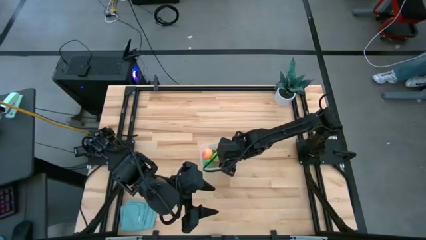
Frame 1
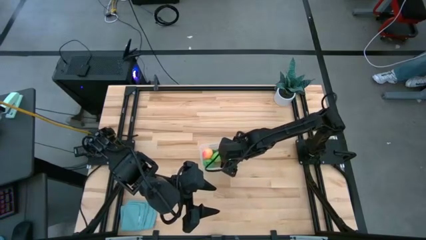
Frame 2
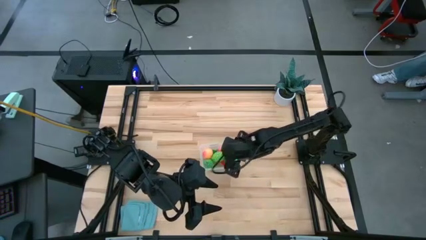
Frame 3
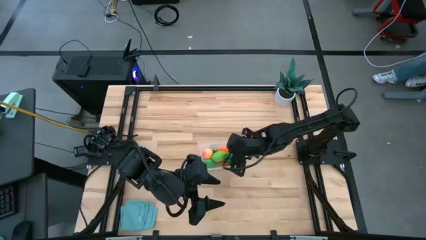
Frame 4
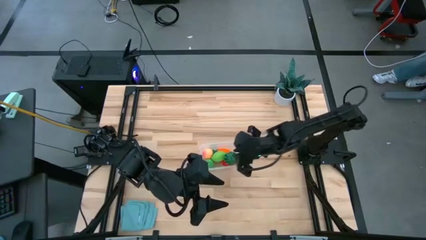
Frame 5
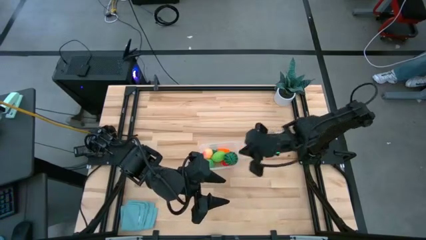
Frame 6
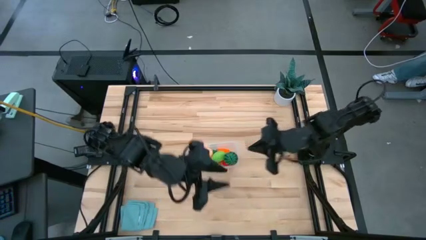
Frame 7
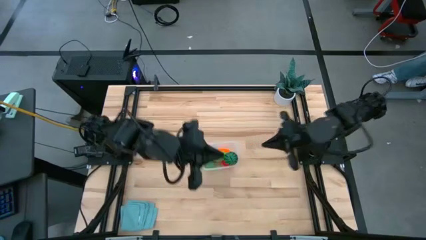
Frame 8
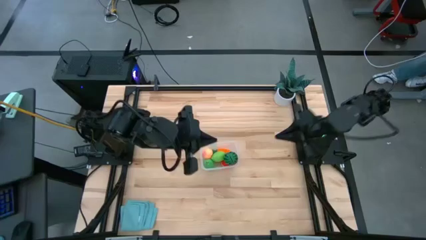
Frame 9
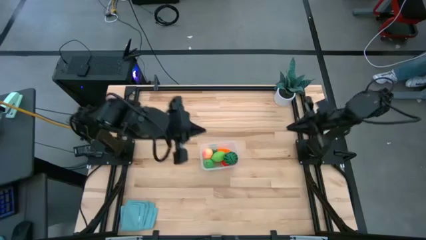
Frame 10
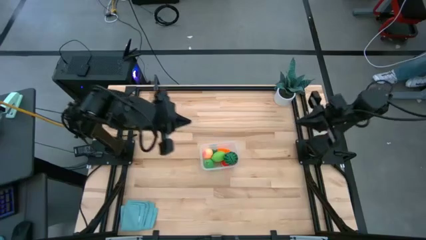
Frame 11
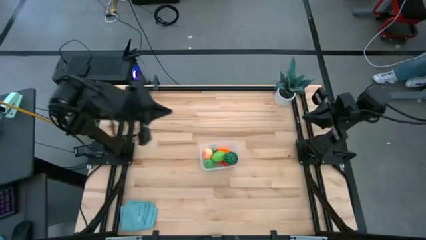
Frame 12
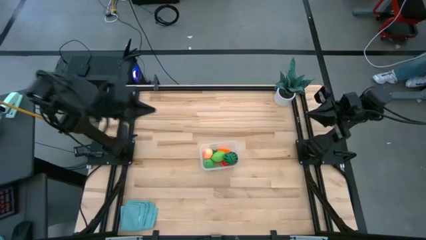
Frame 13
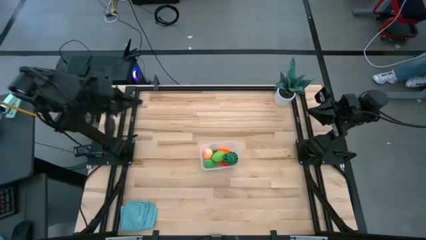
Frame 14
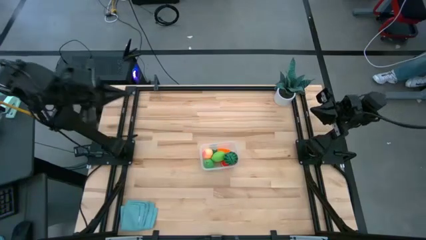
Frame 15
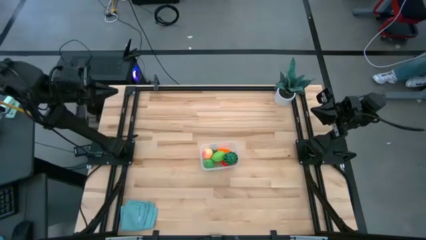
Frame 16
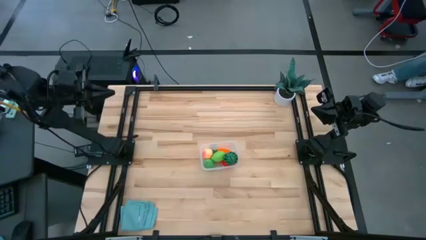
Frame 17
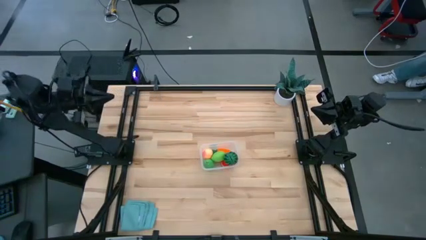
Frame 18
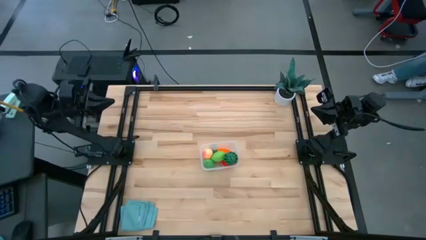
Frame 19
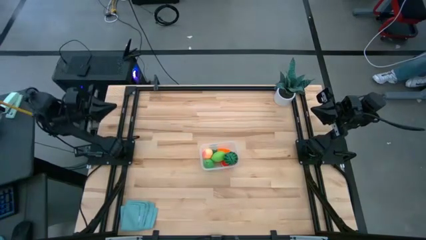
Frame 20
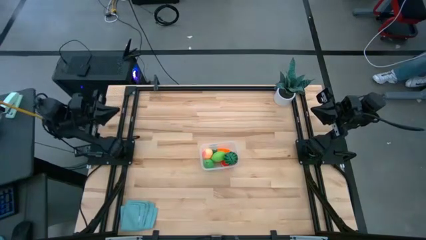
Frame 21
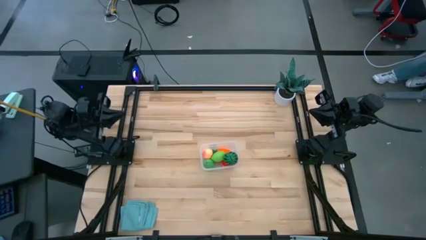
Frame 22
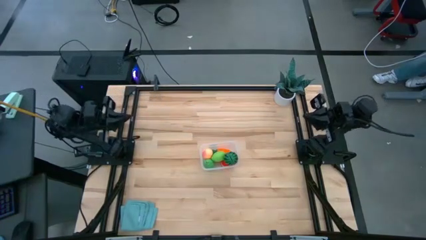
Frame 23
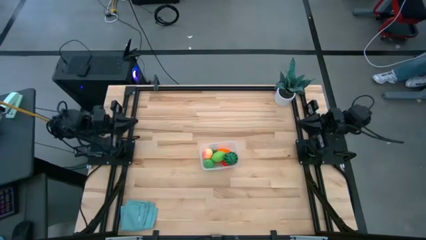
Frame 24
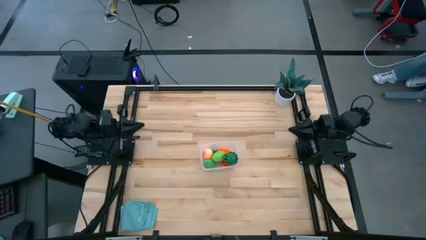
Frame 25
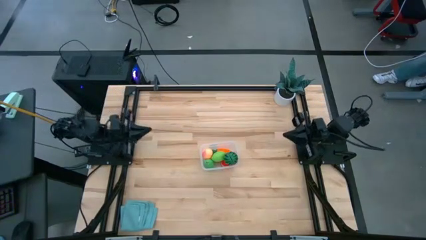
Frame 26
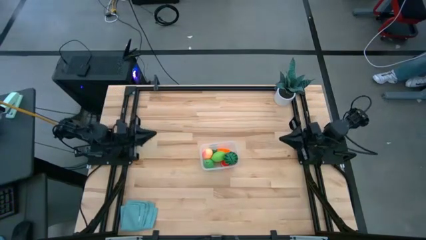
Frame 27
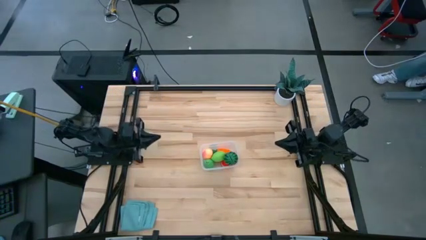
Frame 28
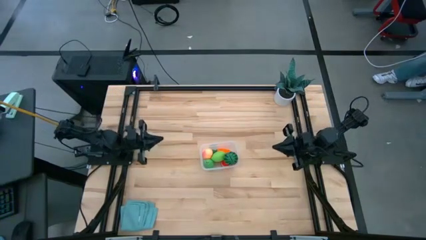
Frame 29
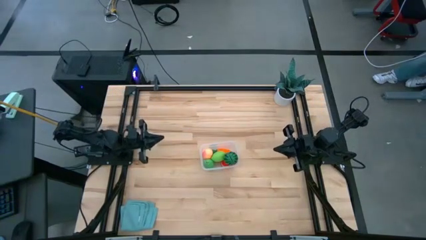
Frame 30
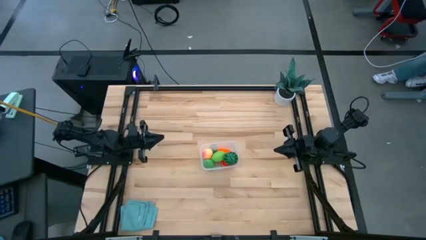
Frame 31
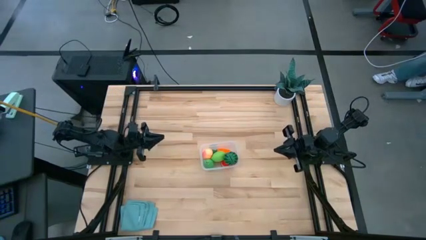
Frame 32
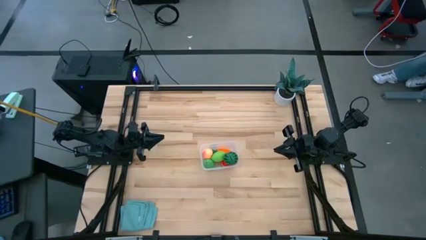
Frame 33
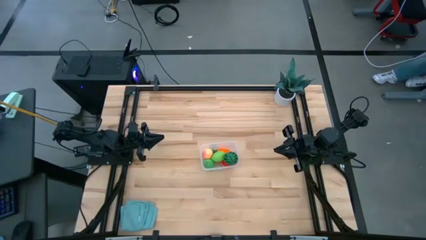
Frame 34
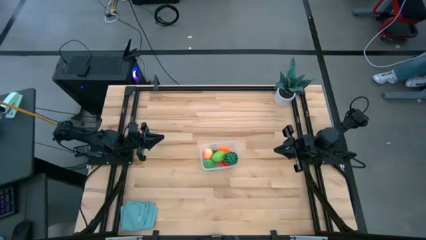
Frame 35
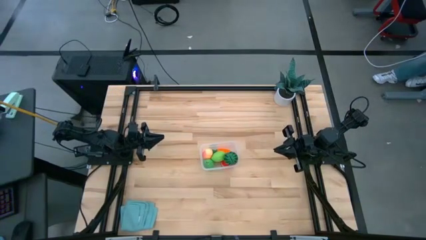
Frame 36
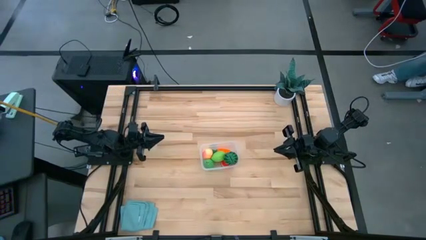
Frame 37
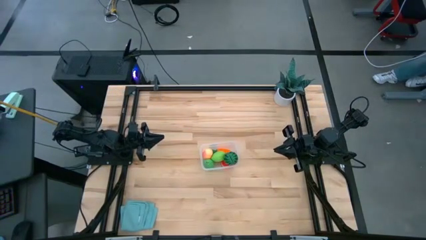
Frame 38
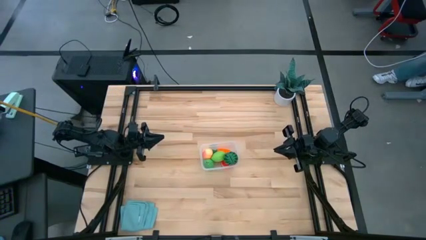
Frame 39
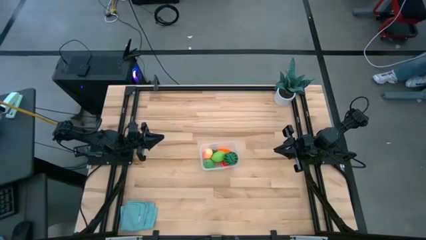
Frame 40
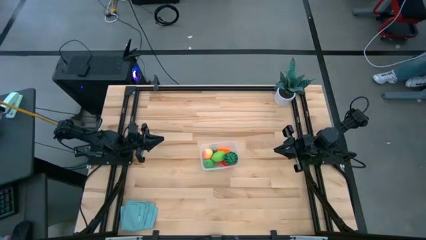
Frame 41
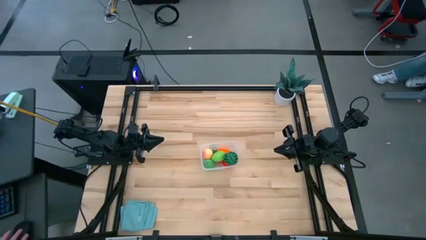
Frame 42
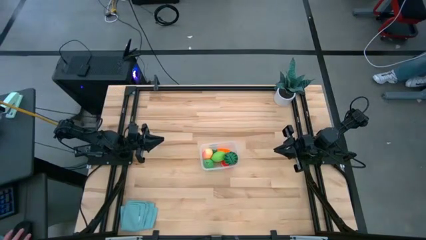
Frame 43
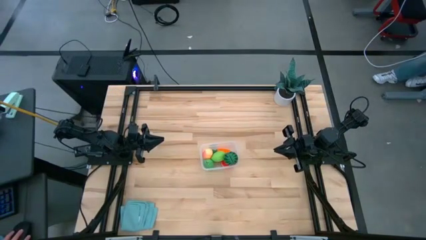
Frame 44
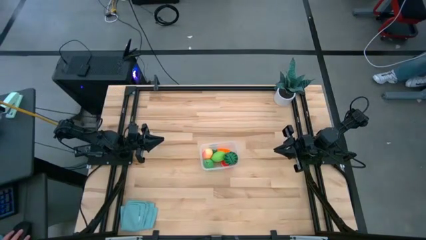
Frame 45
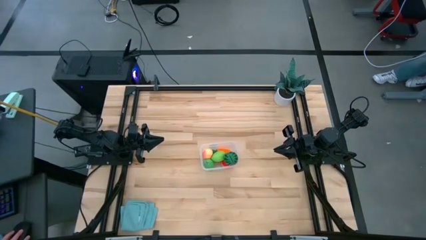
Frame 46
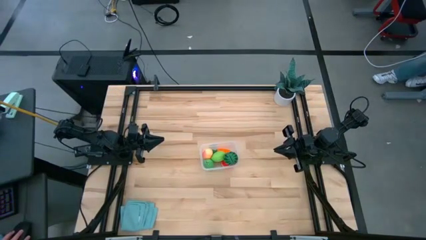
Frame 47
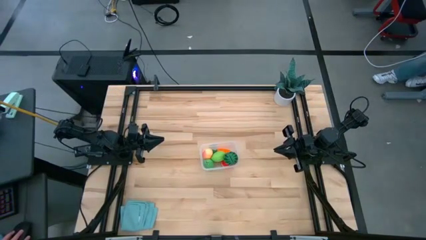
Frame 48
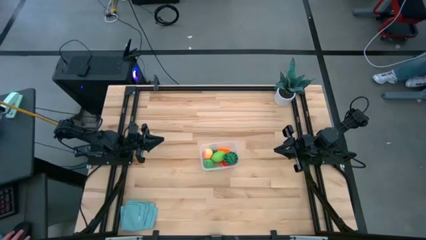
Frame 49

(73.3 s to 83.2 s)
Task: Pick and placing Produce into tupperware
Return to Home Position

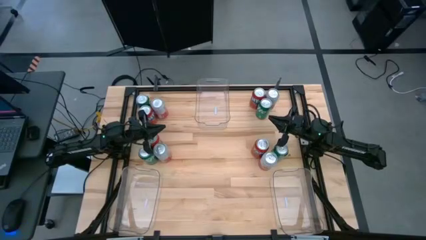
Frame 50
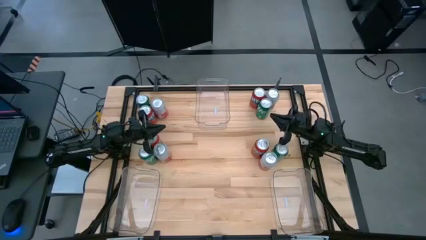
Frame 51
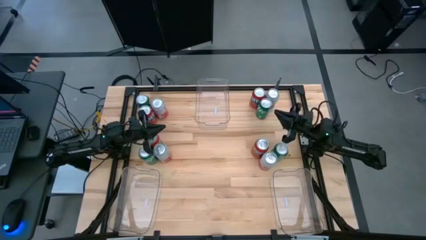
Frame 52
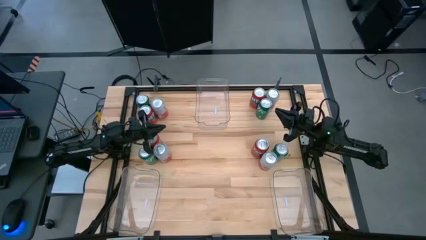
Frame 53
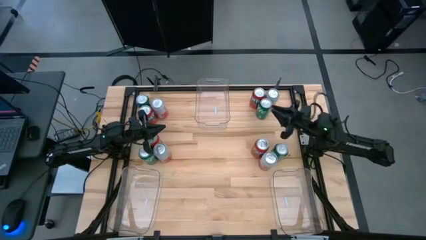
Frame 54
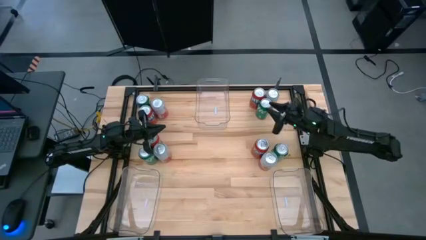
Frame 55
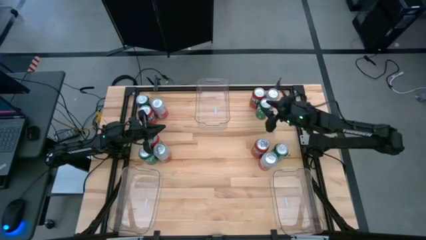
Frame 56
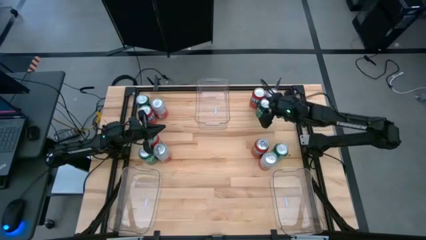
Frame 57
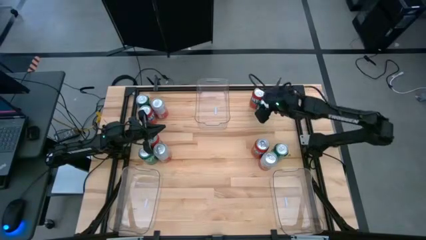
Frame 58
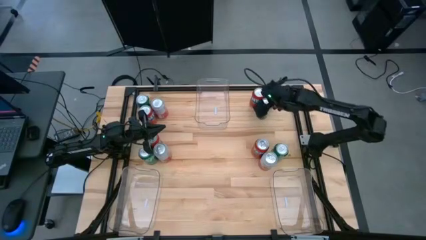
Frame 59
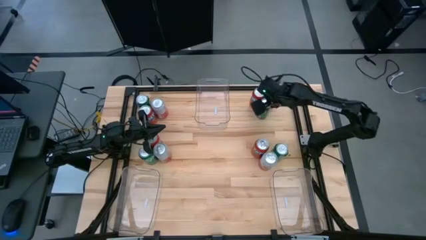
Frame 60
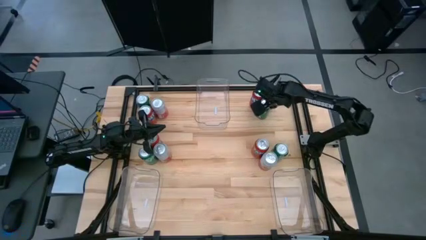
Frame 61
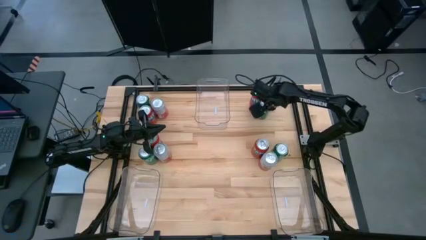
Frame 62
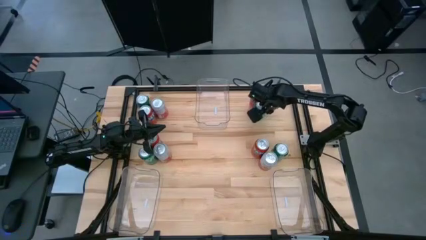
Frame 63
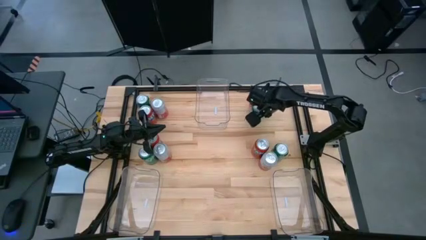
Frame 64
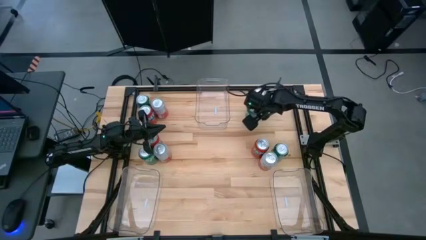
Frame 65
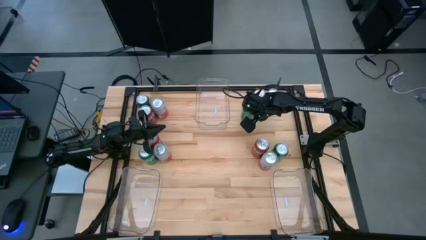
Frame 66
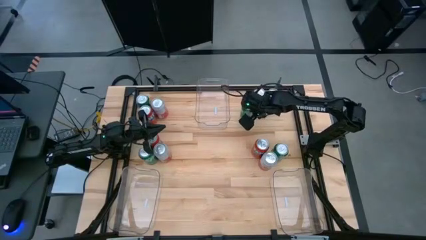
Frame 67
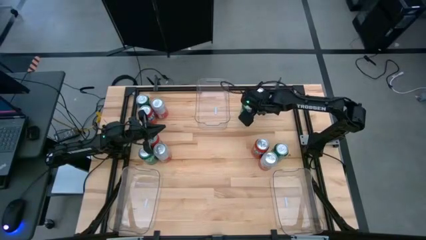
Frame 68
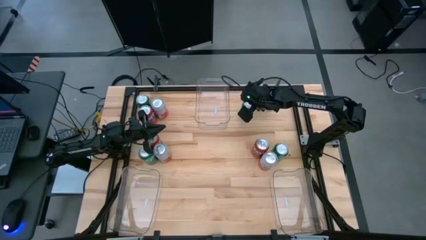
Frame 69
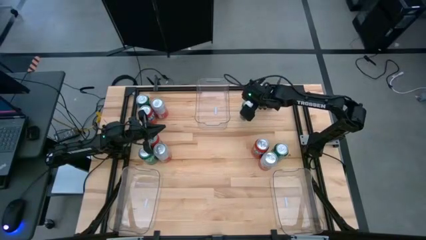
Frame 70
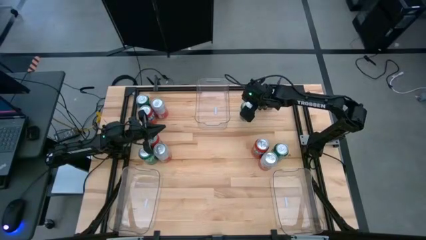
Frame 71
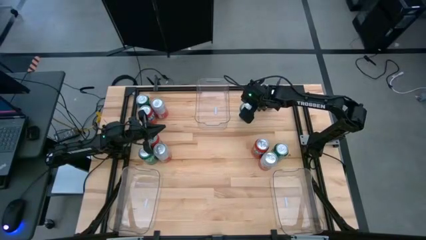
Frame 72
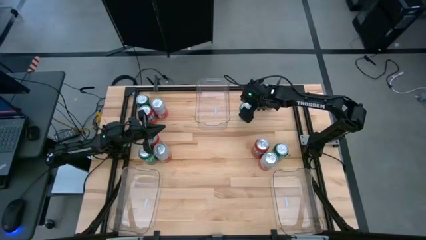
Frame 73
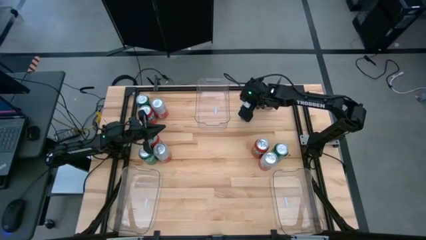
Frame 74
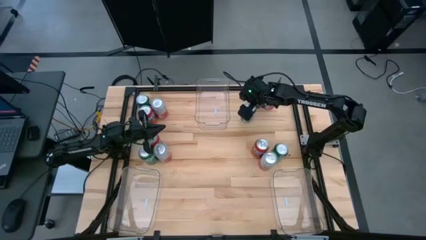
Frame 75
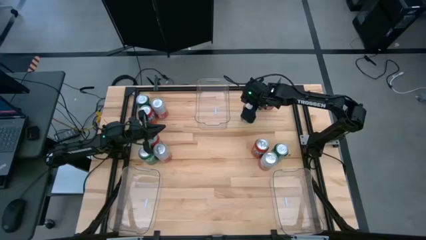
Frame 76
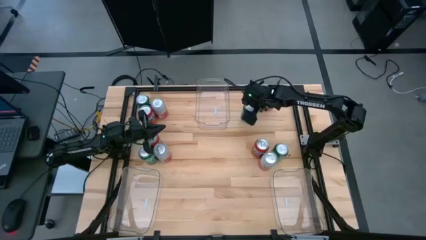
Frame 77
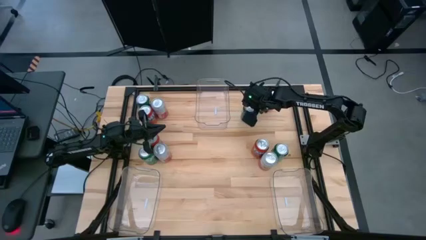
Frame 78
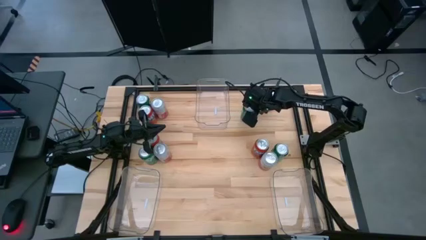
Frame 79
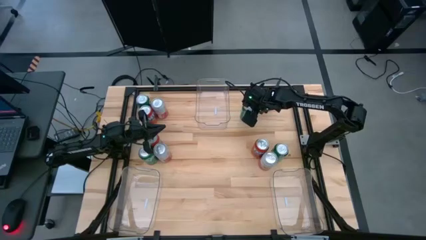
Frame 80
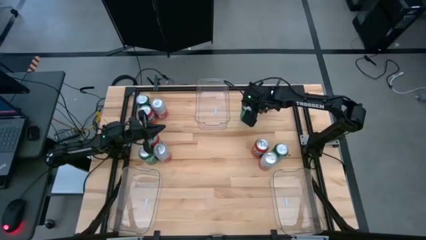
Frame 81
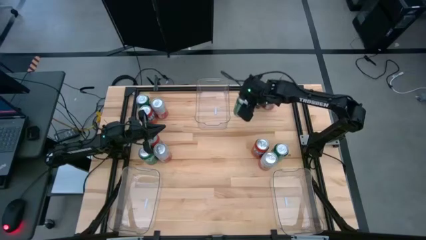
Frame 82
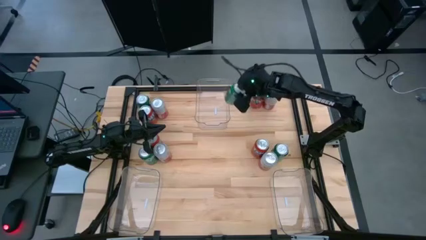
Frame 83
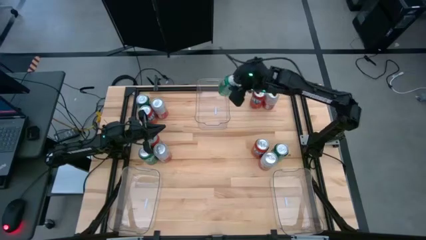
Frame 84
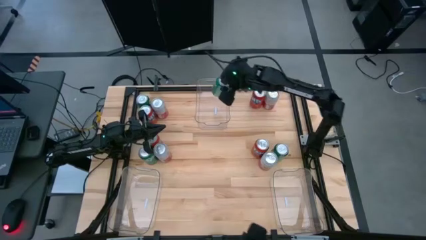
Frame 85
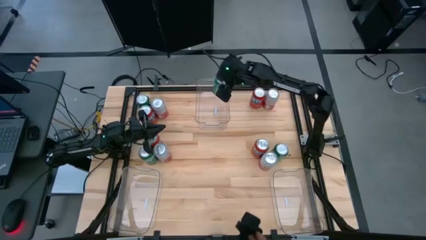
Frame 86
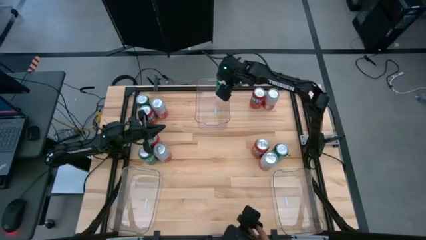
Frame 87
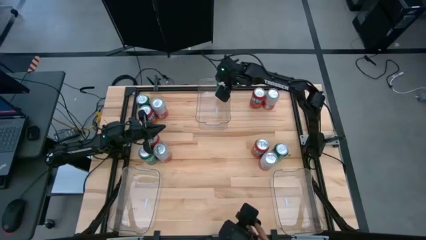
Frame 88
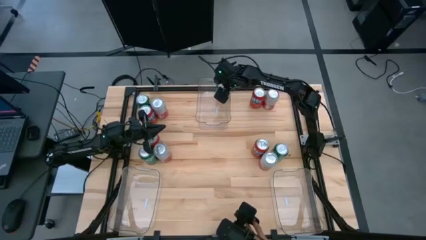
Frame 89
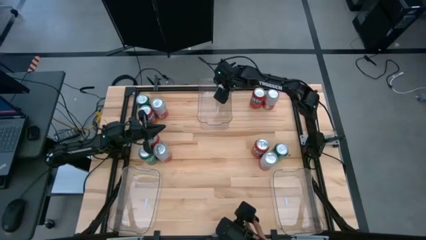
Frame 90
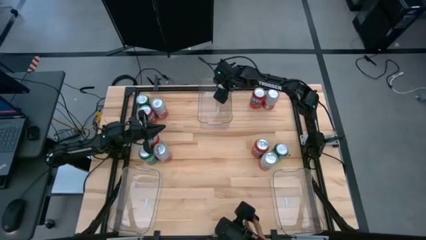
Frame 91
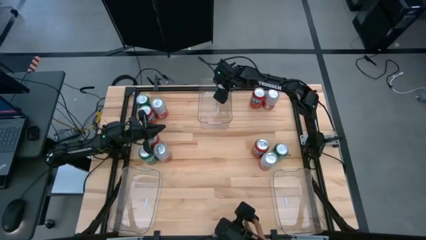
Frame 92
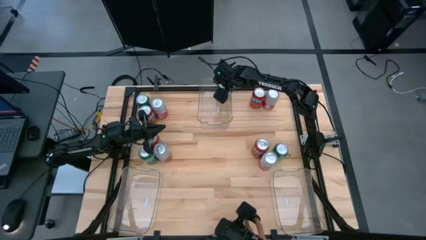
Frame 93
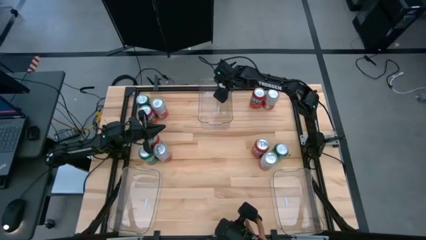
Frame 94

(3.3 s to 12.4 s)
Task: Sort soda cans
Put the top right green soda can into the top transparent bin
